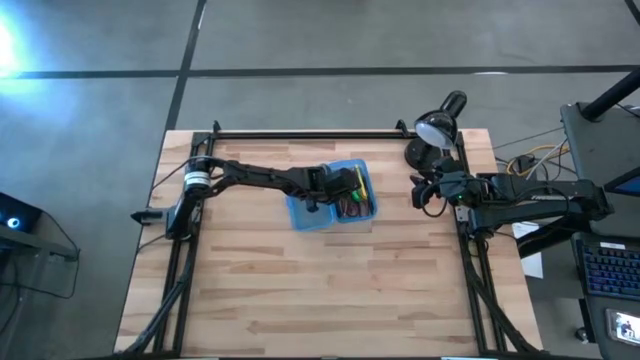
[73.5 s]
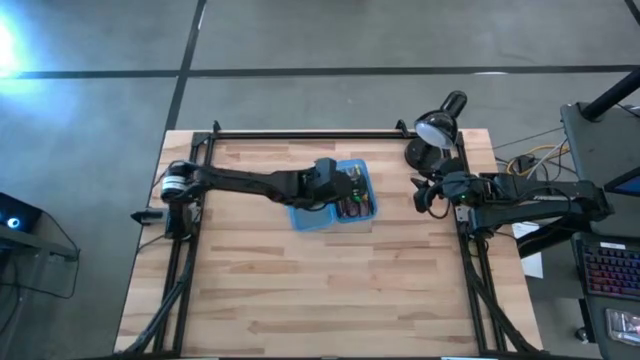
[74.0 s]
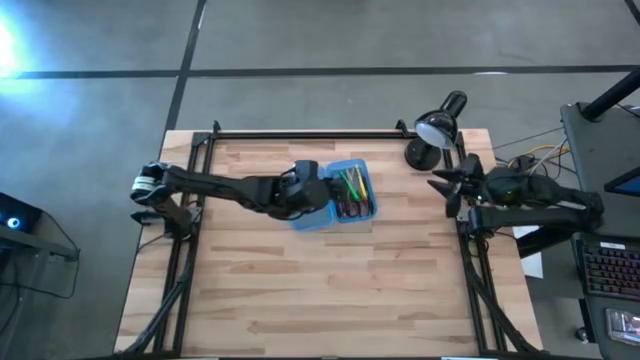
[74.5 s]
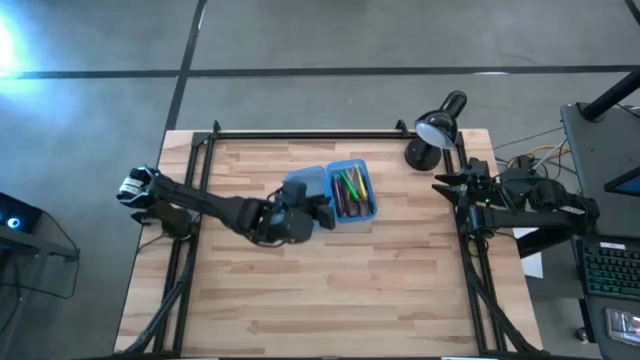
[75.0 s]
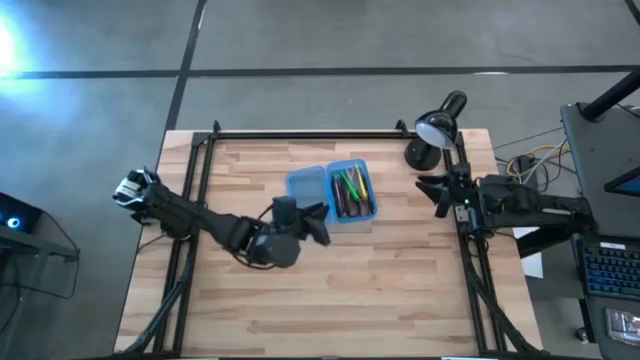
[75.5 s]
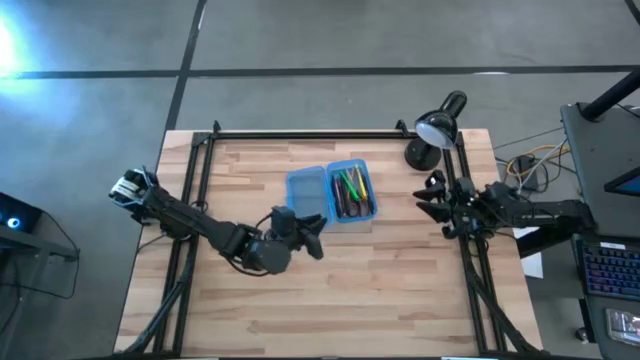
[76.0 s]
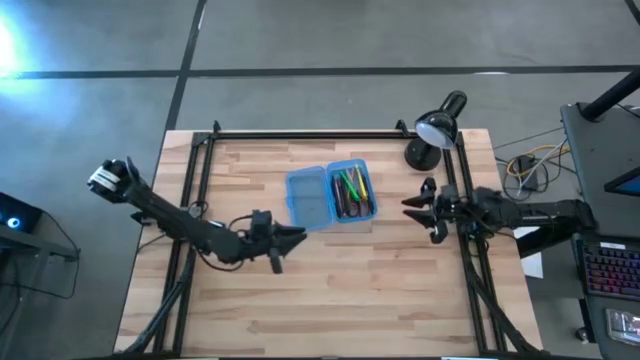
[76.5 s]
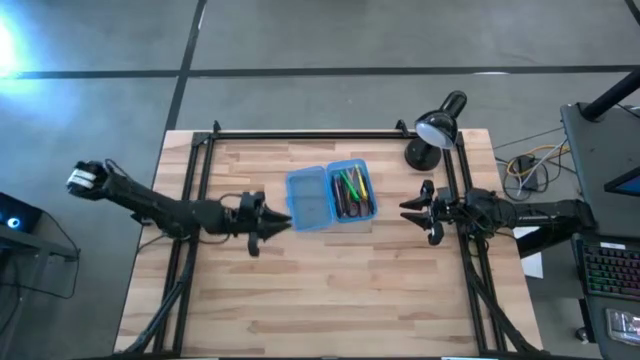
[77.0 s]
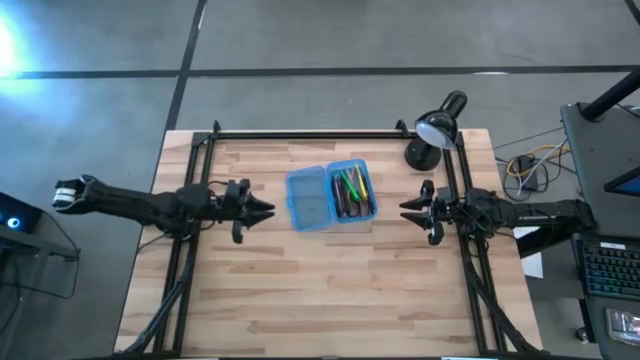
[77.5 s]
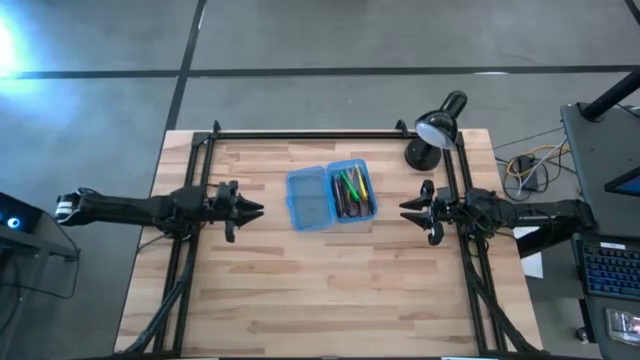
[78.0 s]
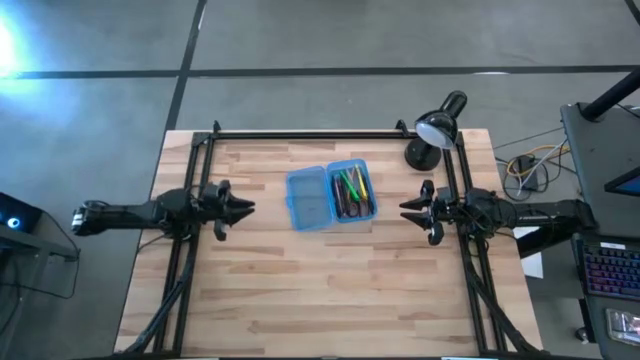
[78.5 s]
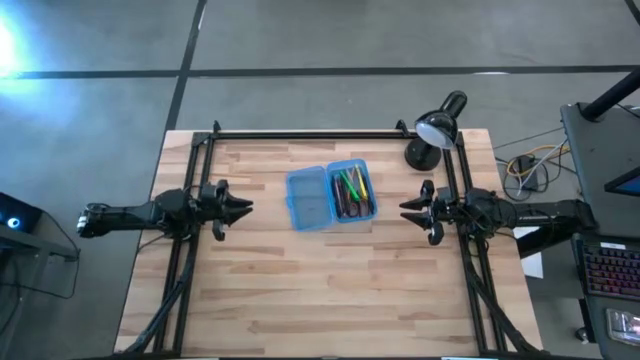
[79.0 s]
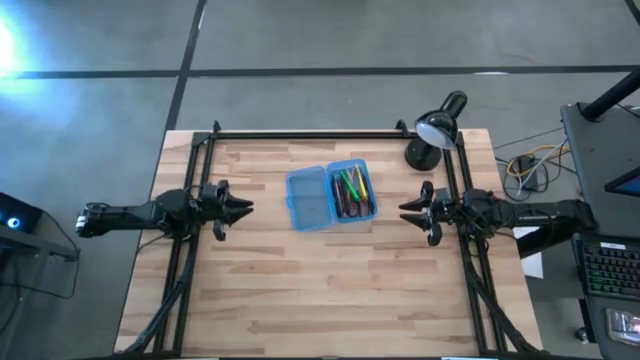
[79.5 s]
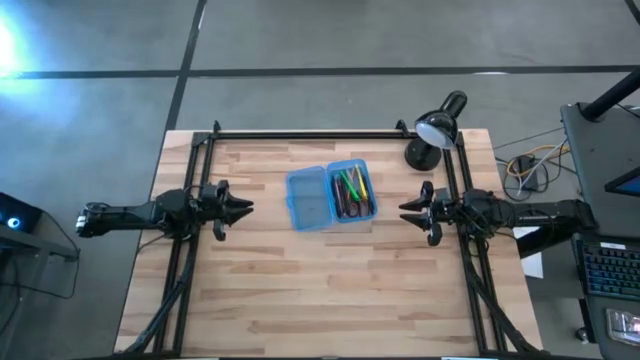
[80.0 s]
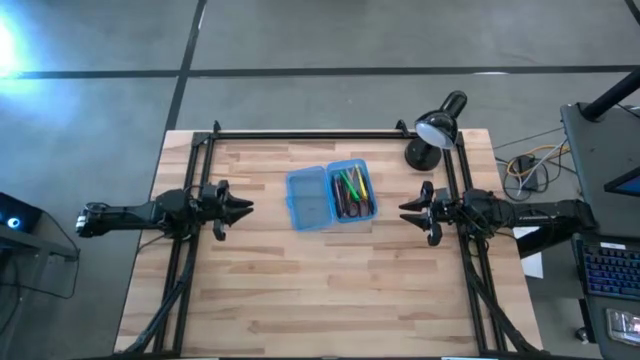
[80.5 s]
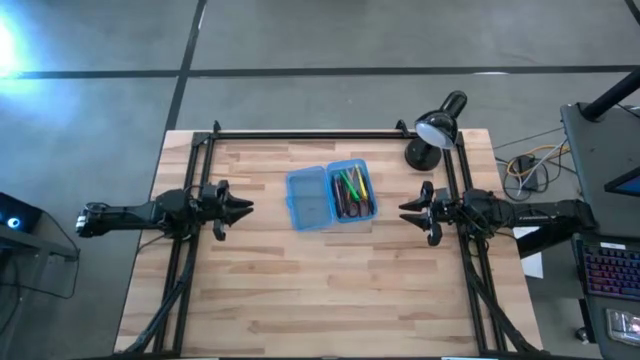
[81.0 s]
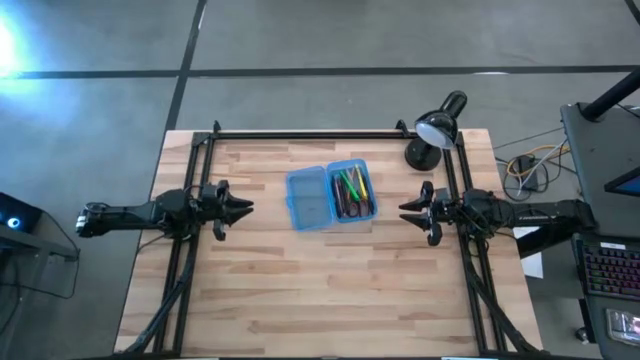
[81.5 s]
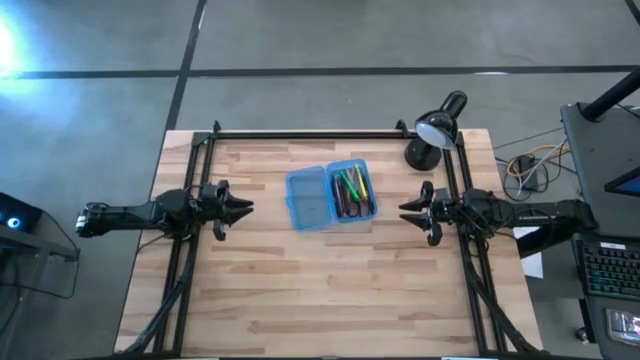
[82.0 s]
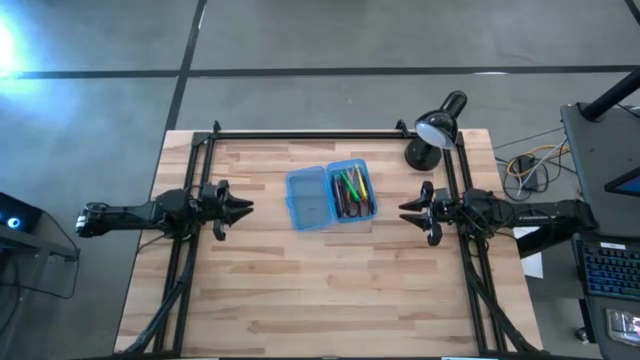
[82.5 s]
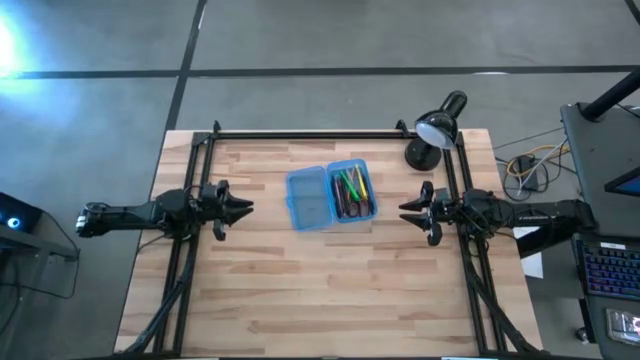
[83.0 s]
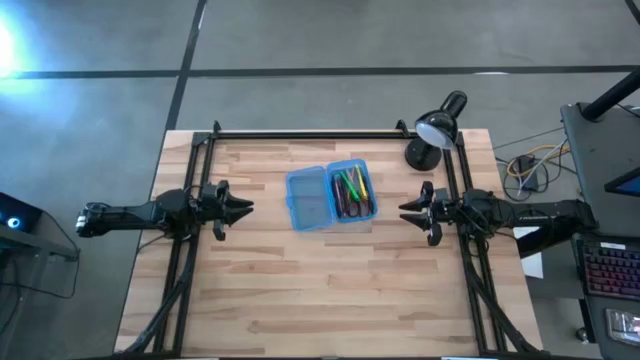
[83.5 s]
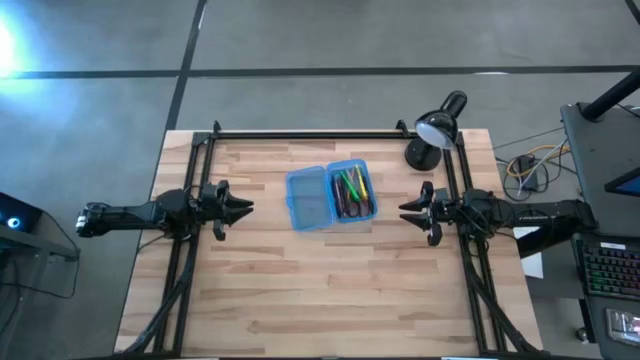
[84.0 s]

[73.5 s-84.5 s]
Task: Pick & place school supplies into a supply box
Return to Home Position

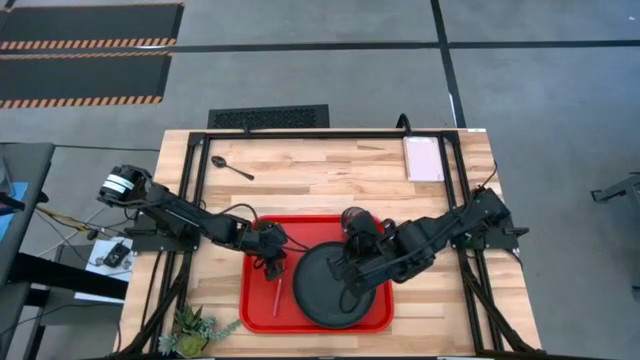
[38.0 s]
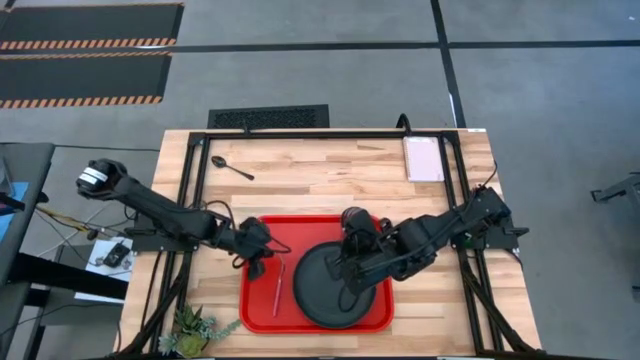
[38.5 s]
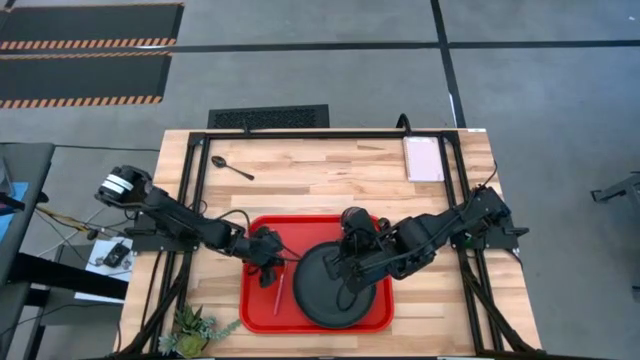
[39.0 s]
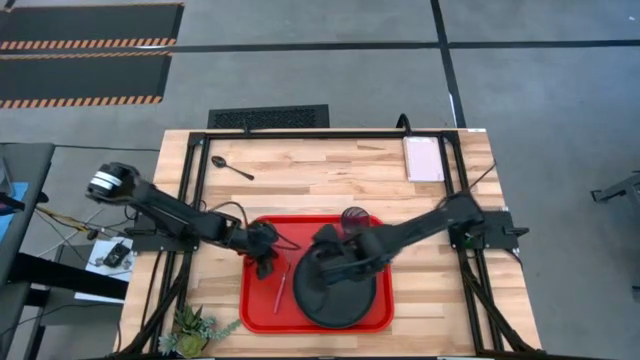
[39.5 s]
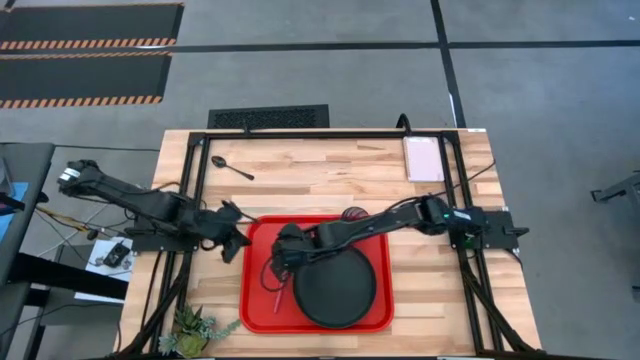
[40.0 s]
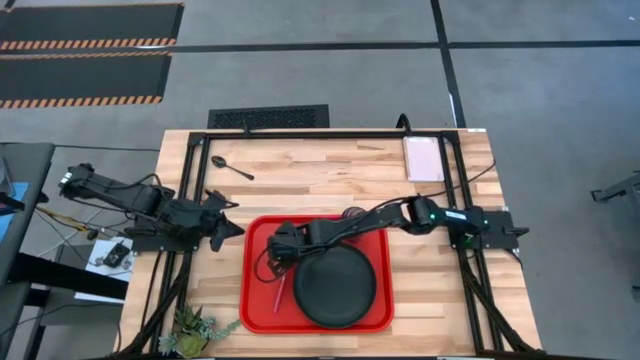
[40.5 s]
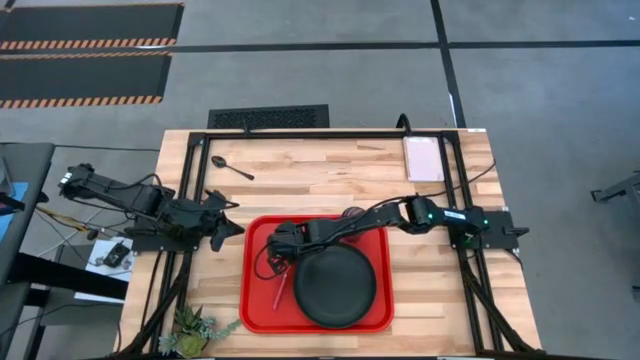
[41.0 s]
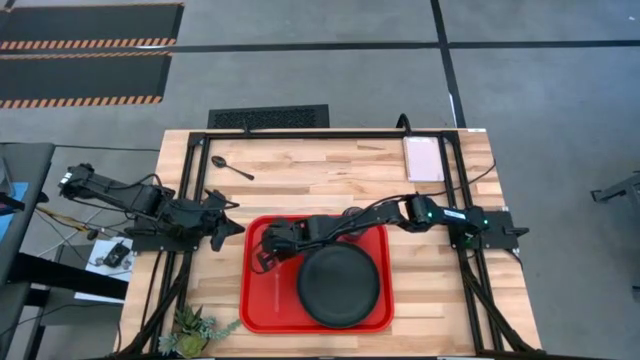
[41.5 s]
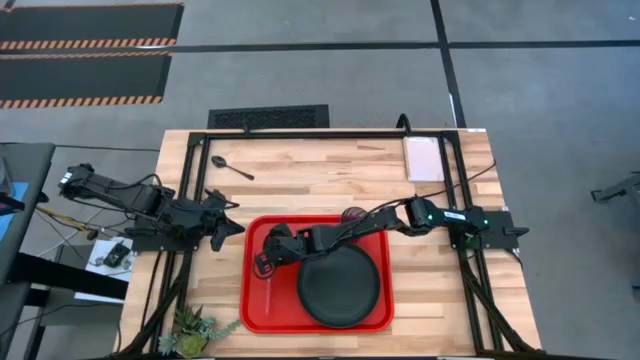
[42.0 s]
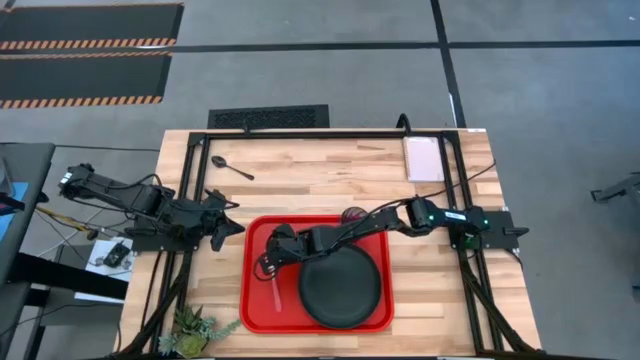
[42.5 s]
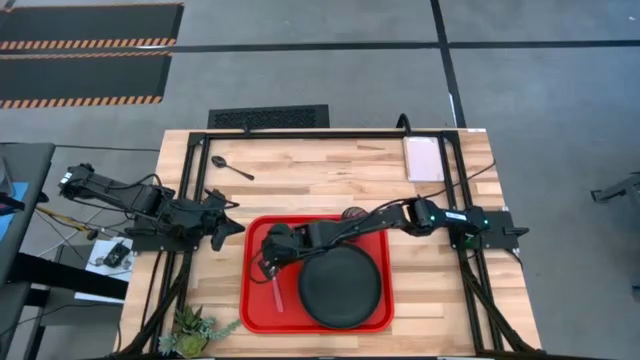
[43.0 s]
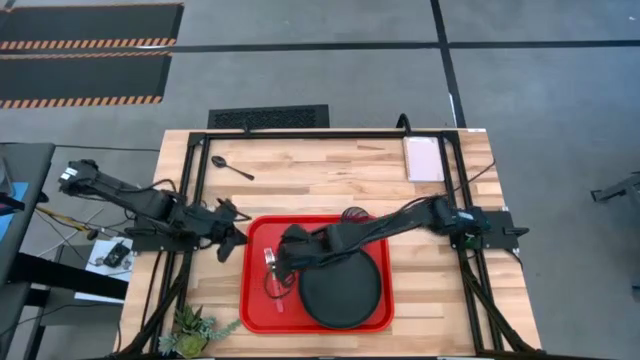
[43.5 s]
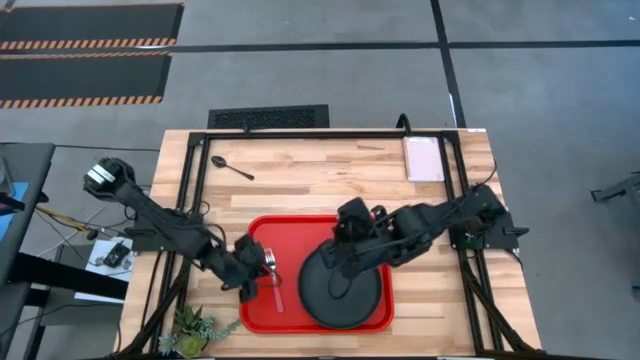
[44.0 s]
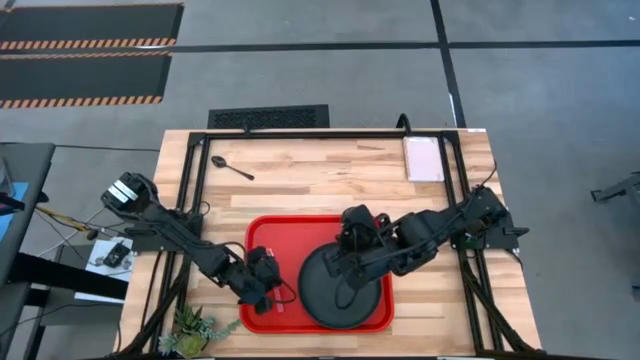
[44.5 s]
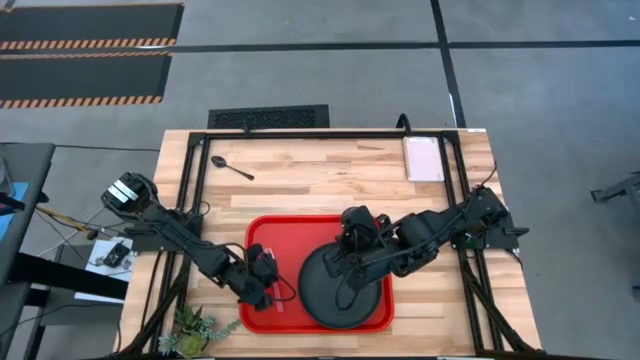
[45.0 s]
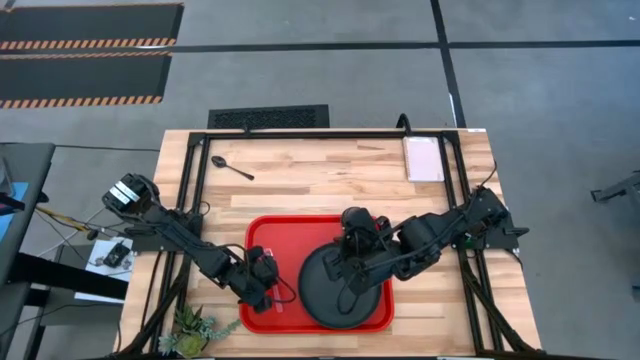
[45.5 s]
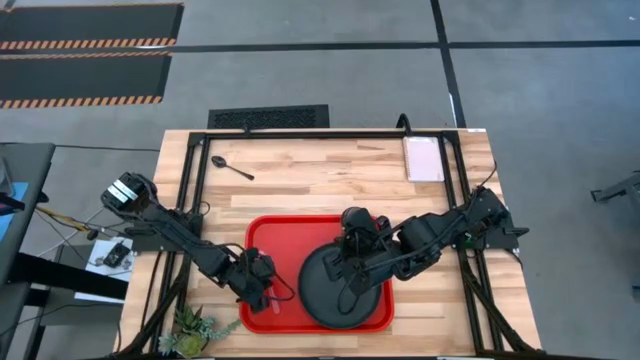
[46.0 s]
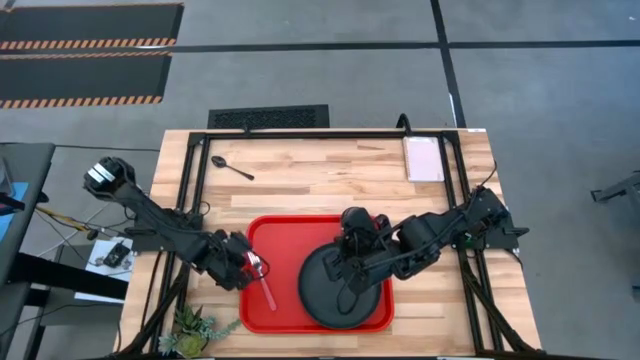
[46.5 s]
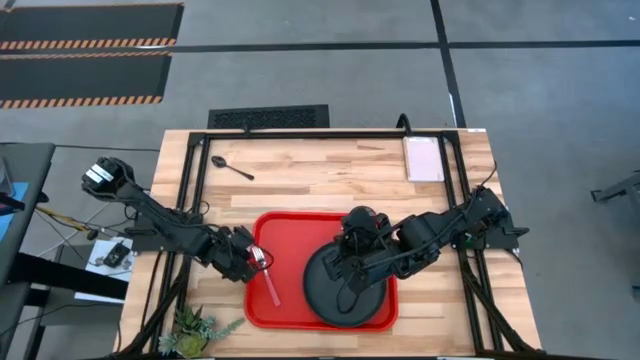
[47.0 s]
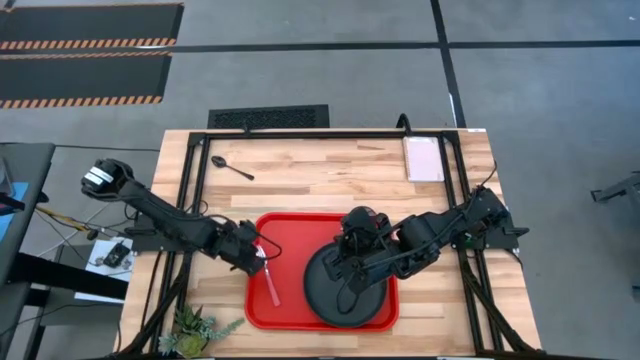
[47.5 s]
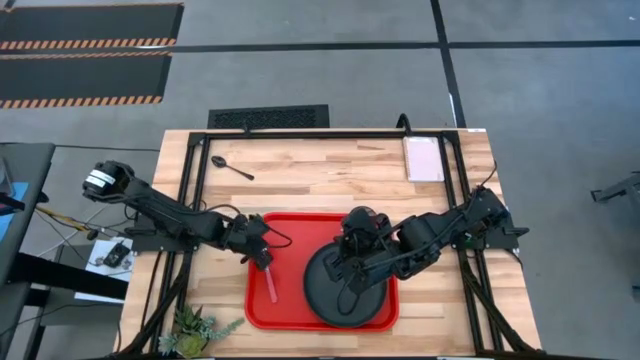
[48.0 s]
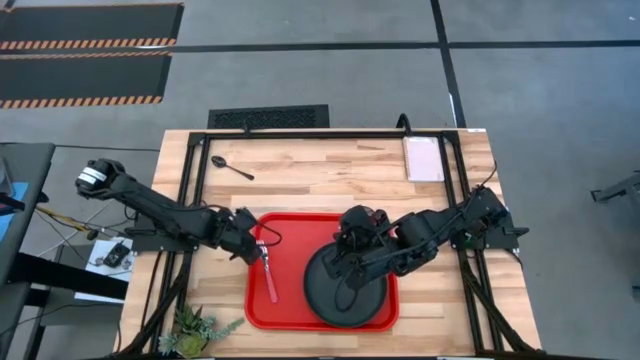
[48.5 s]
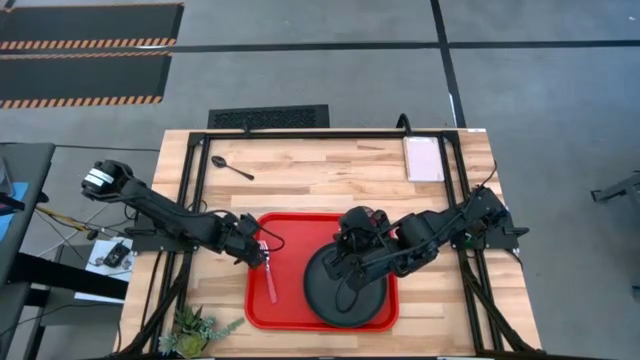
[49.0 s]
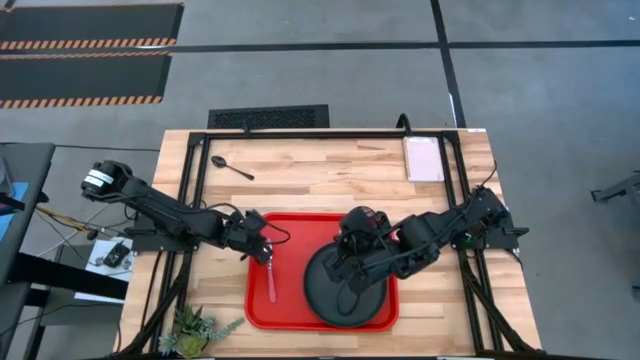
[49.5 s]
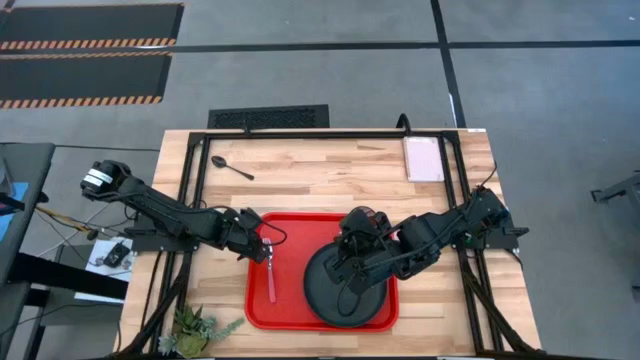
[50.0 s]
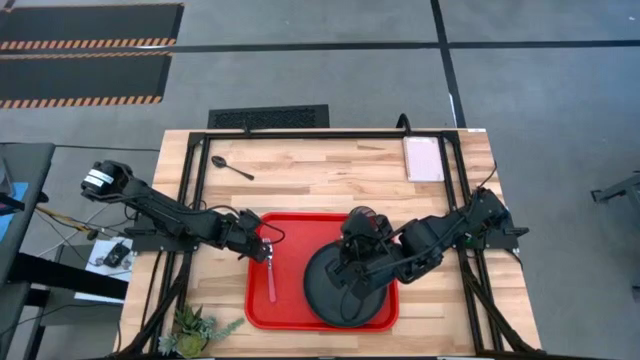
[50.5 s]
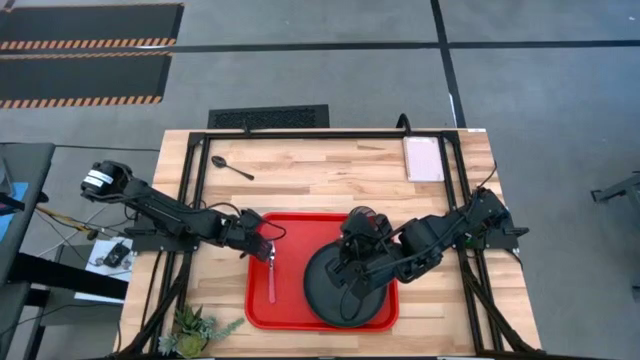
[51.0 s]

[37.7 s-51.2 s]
Task: Pick and place plate/cup/fork/spoon on tray
Put the pink fork into the red serving tray
